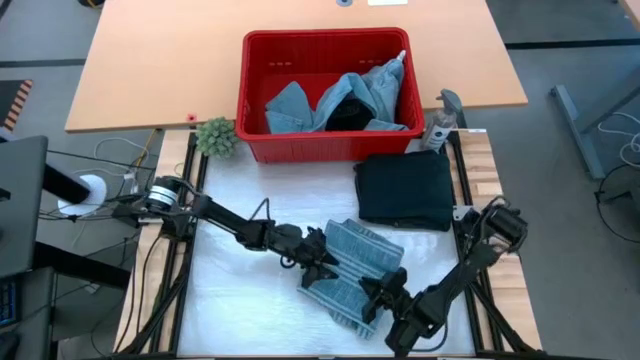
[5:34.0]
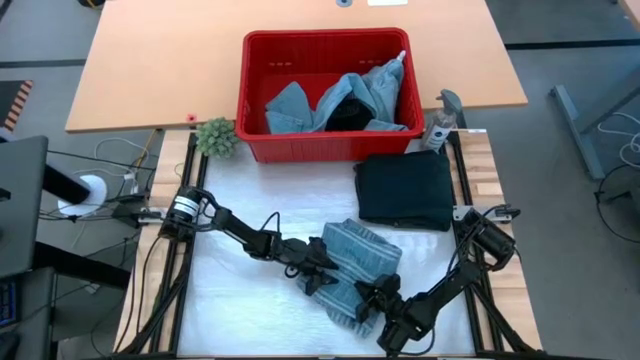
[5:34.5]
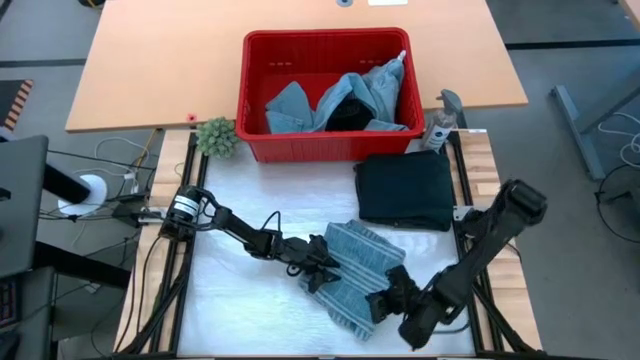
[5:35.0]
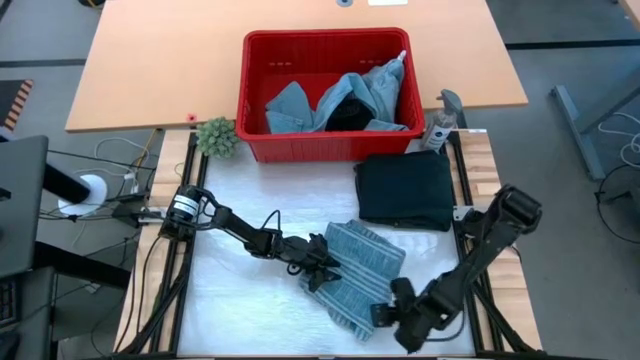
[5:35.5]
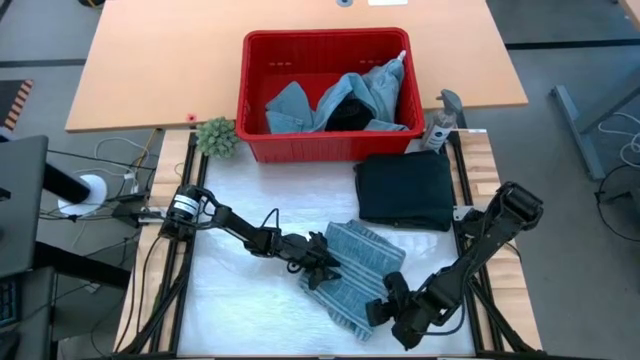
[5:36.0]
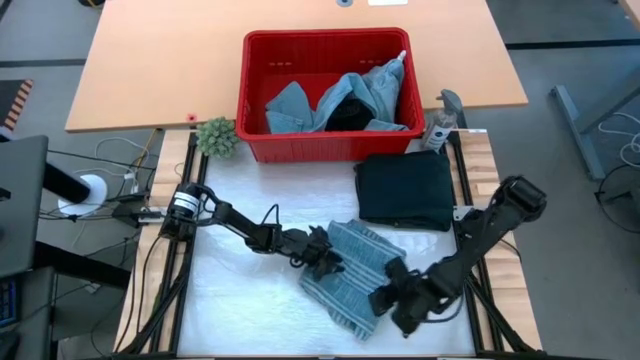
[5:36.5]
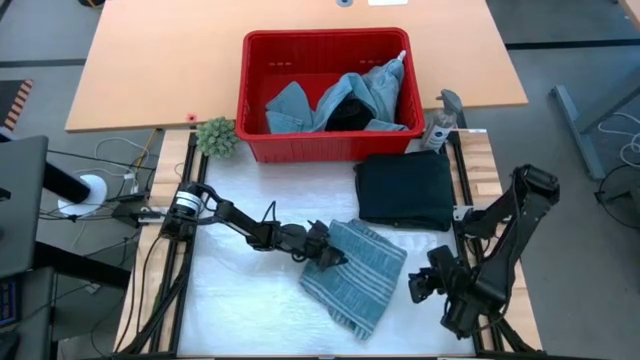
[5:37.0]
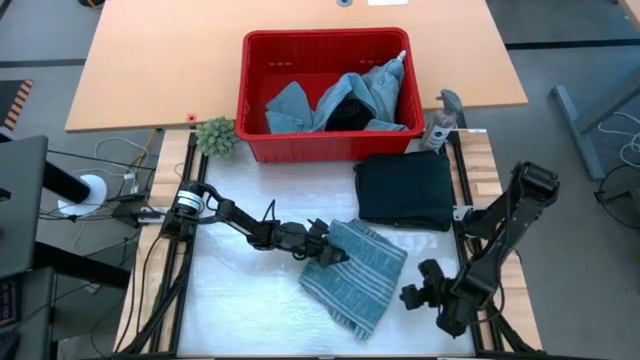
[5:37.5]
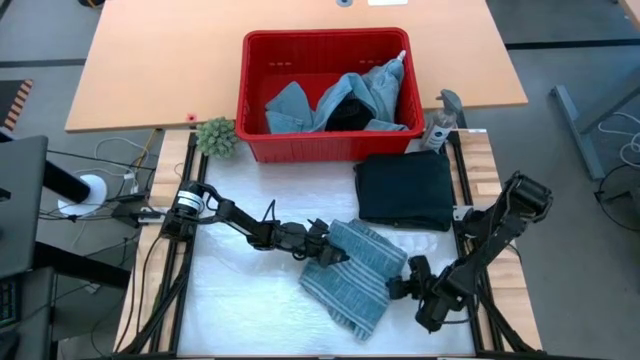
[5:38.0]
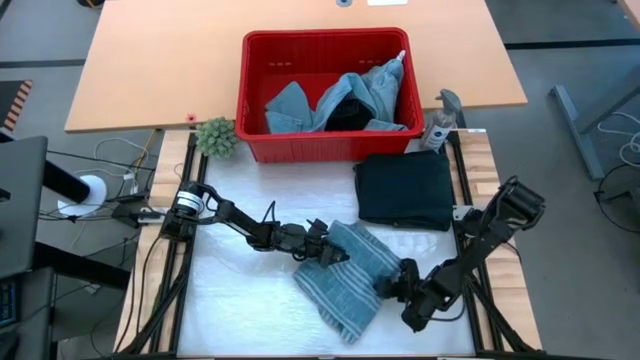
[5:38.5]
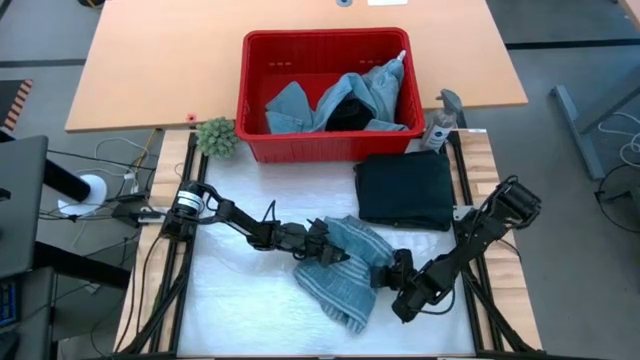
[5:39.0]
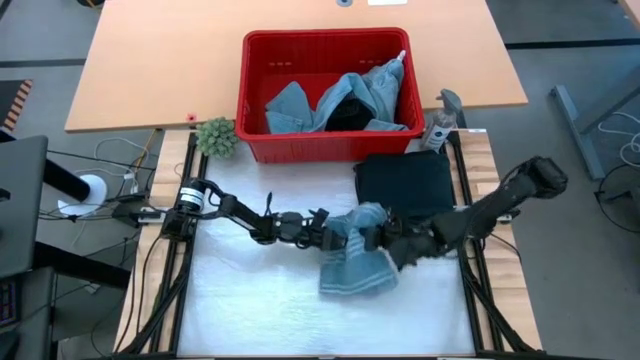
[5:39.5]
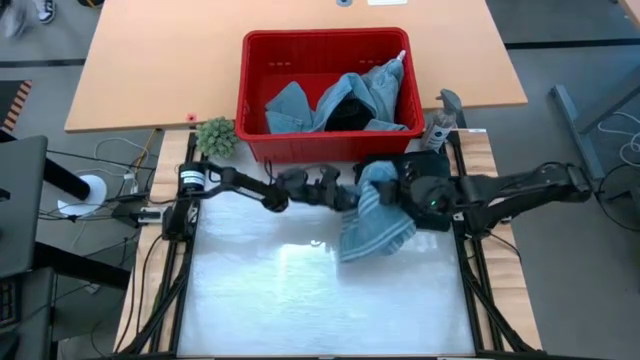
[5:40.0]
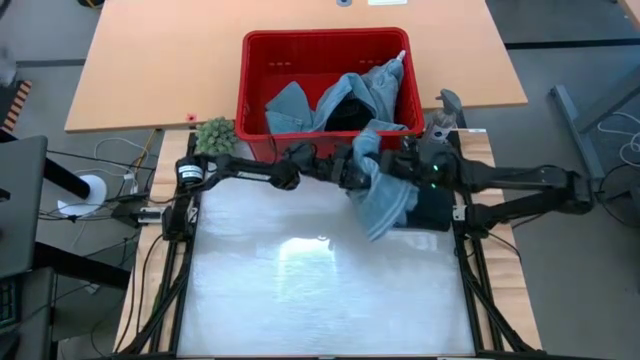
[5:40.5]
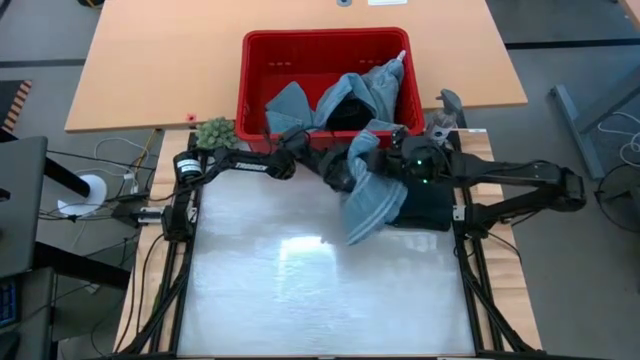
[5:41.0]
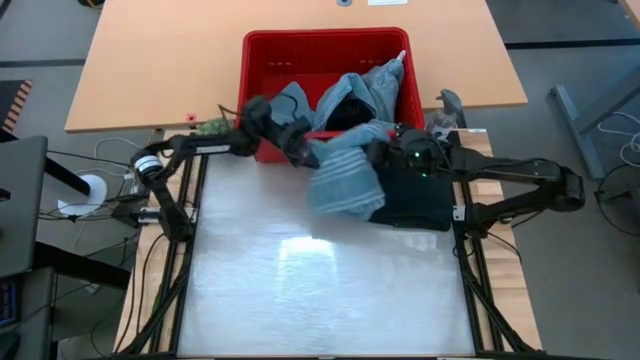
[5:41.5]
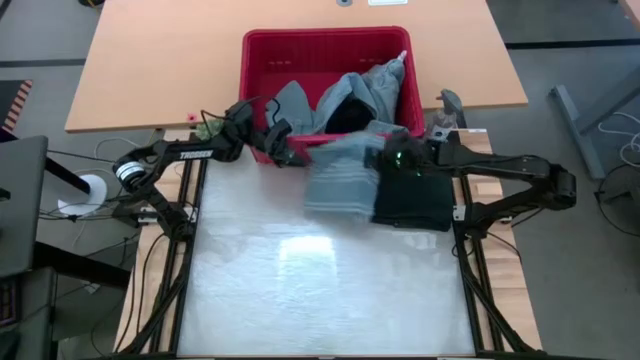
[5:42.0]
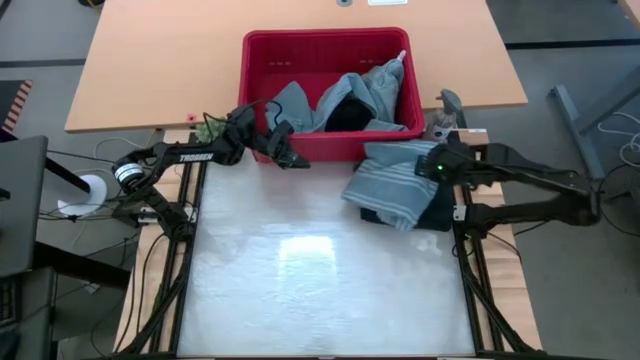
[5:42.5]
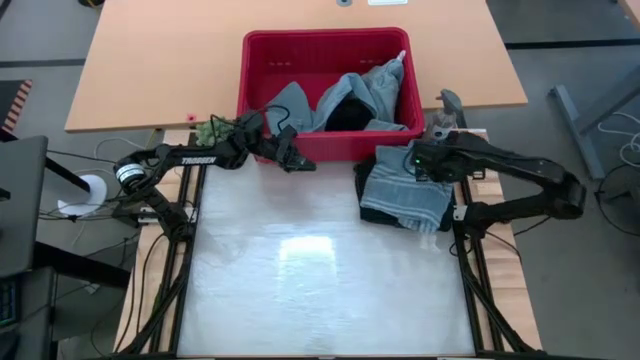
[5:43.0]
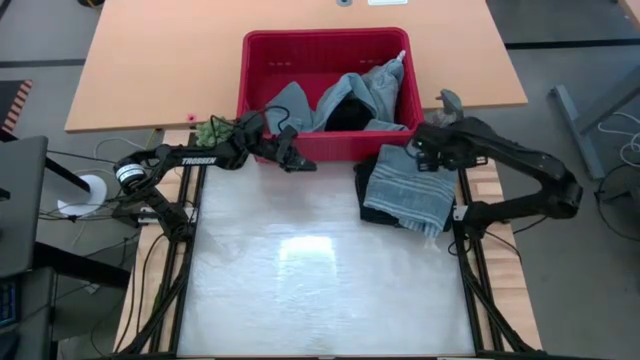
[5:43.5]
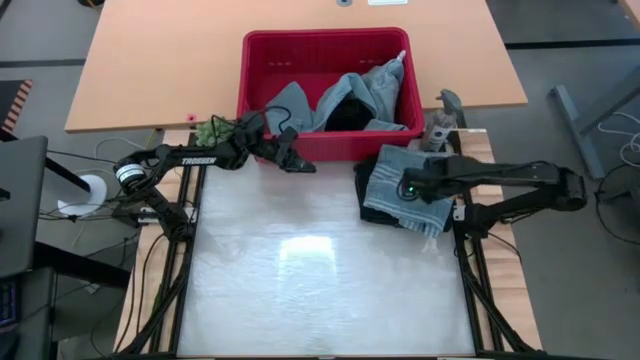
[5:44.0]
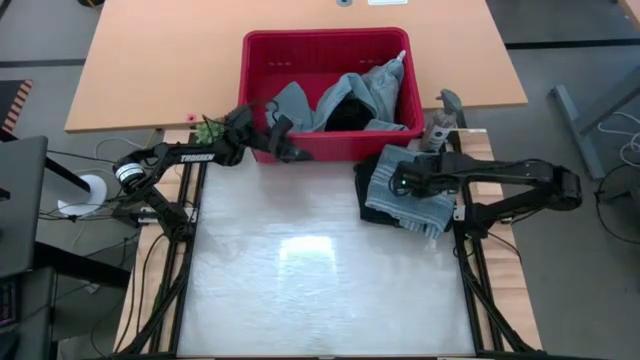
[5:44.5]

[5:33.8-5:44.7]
Task: Fold Laundry from Bin
Stack the folded blue polo shirt on top of the folded black pants

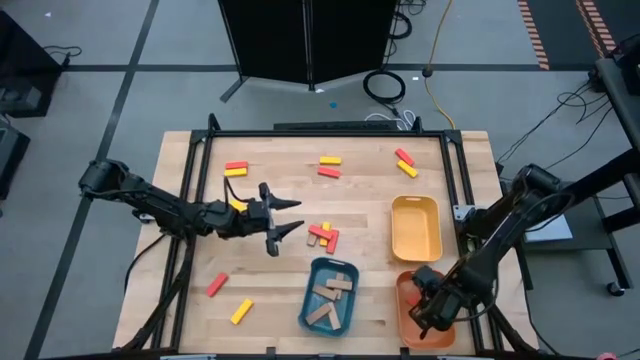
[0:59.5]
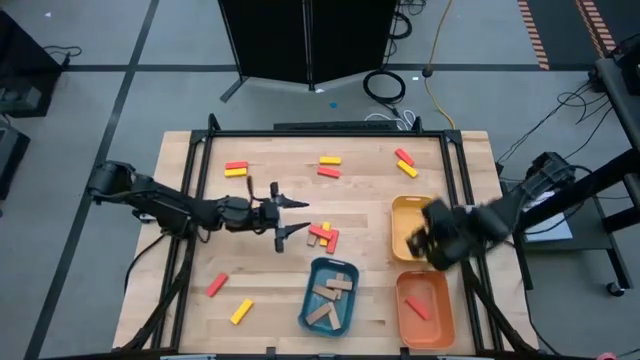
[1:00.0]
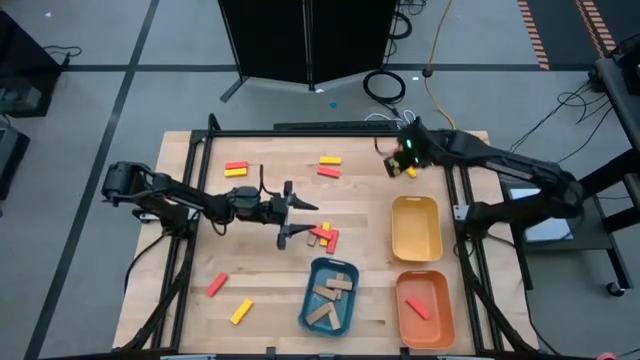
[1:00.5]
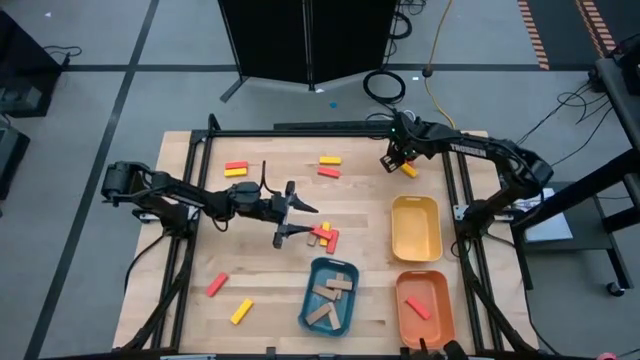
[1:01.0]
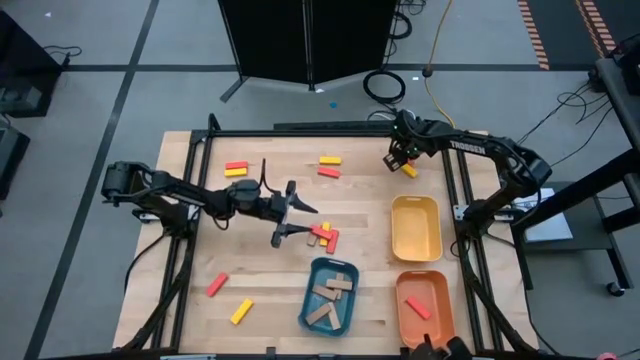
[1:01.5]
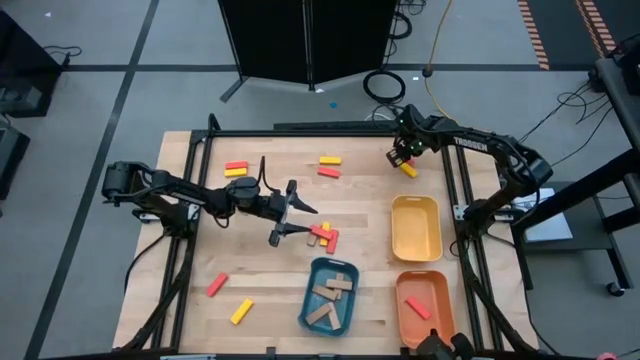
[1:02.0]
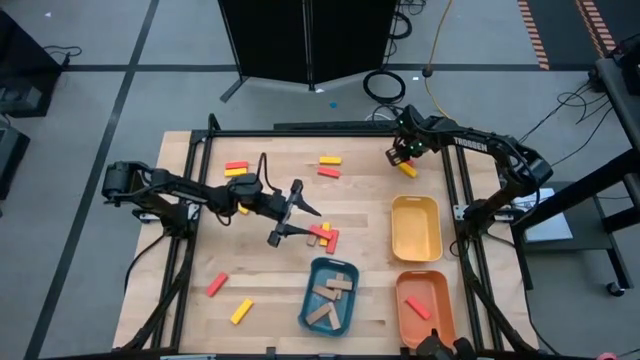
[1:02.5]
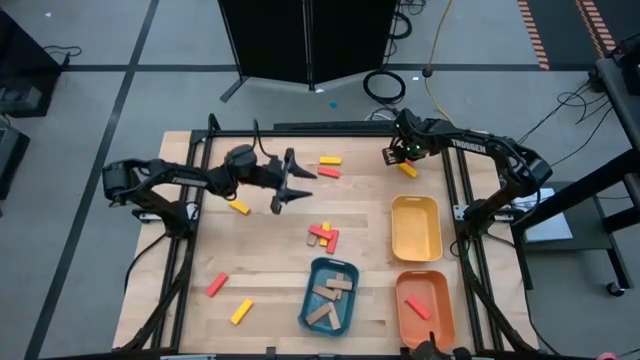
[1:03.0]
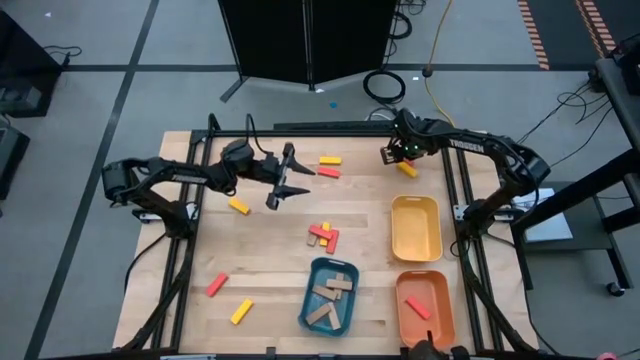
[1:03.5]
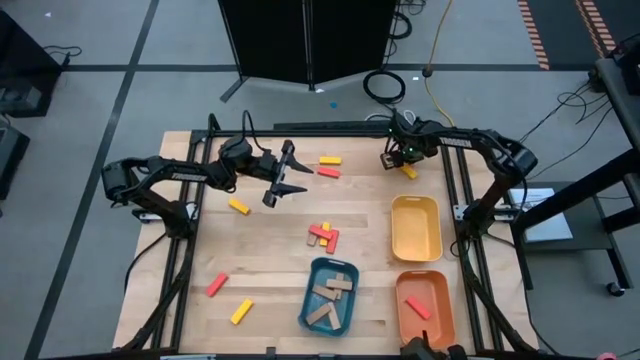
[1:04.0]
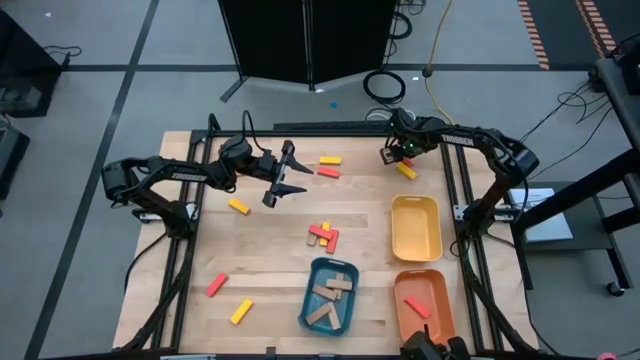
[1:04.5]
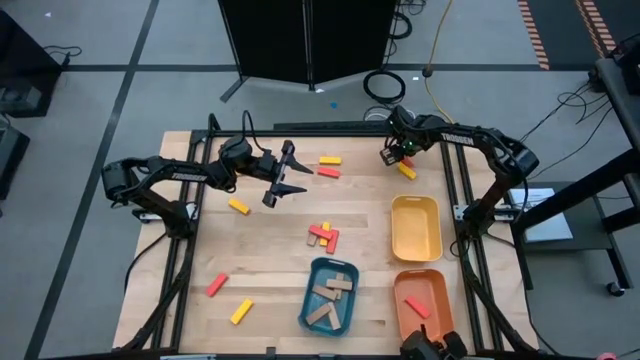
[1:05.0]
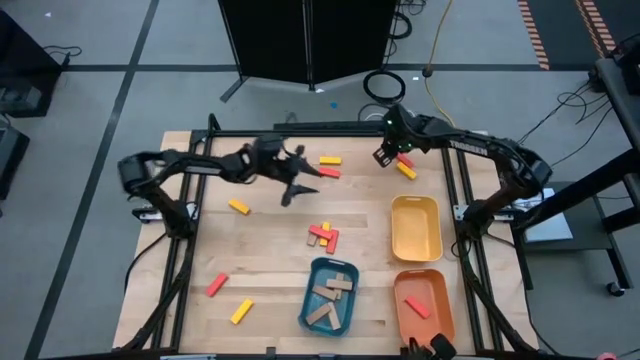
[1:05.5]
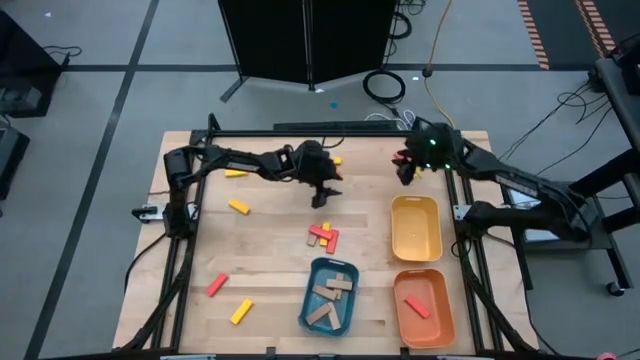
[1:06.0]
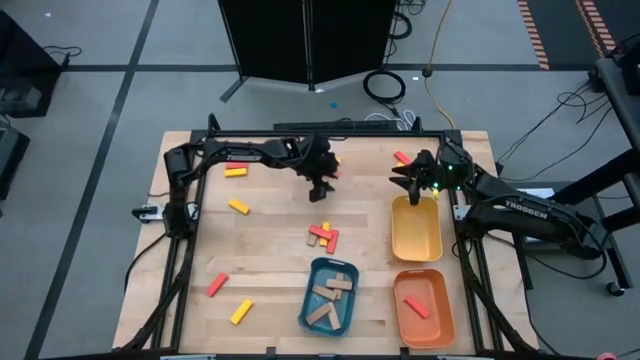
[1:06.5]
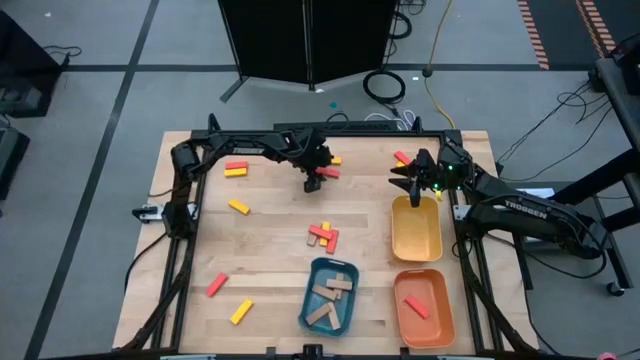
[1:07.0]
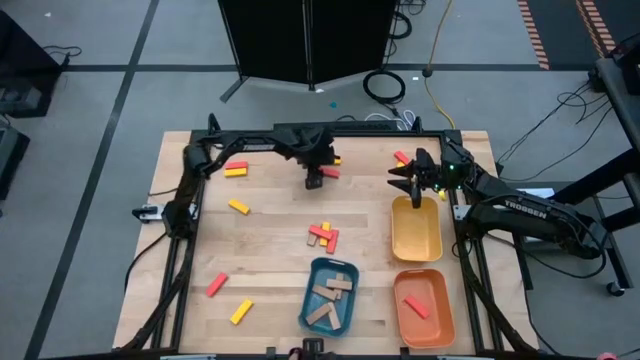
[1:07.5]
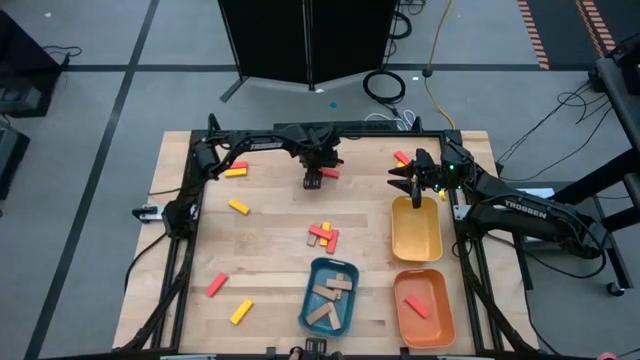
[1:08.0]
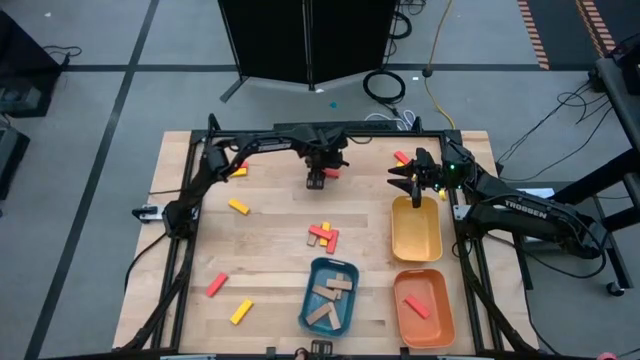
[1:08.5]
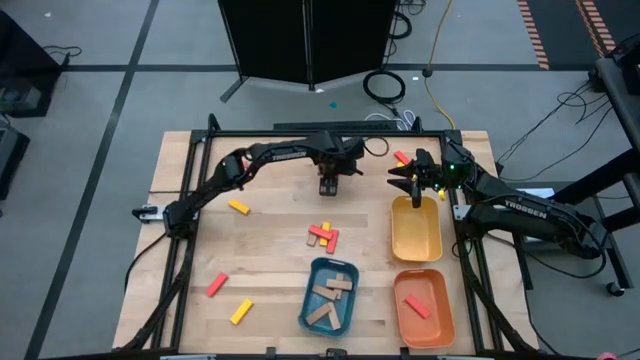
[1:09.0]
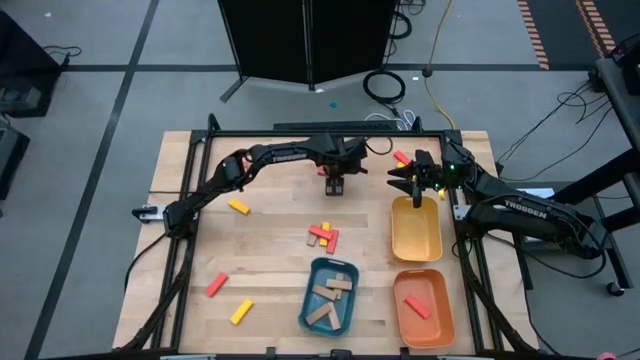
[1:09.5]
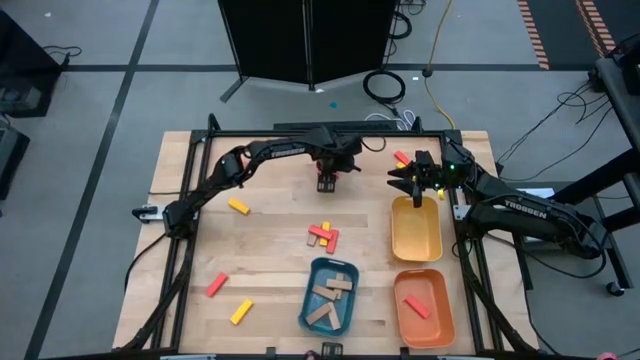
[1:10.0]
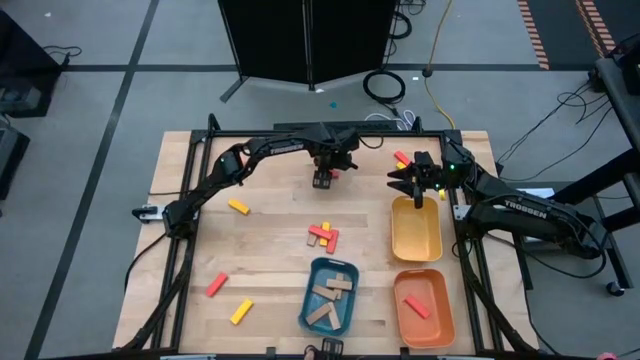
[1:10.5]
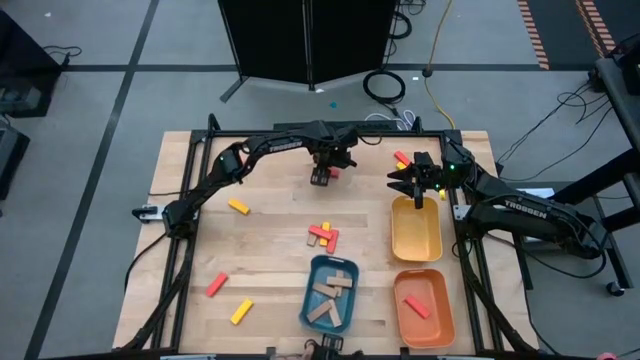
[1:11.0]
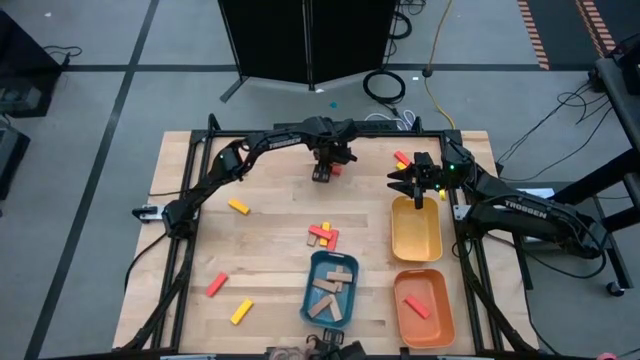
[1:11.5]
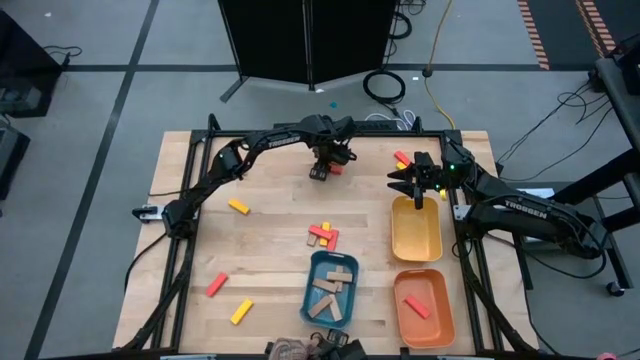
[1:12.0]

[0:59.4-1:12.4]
Task: Sort blocks
Put the orange block into the orange bin
